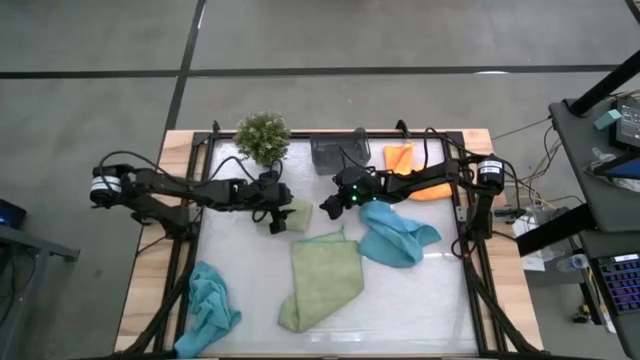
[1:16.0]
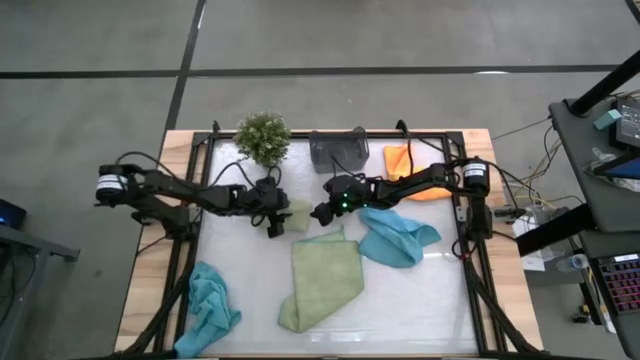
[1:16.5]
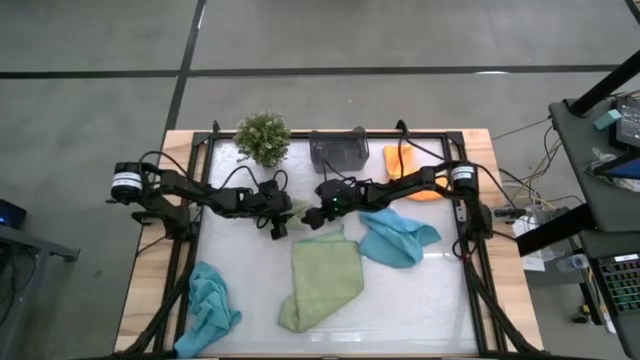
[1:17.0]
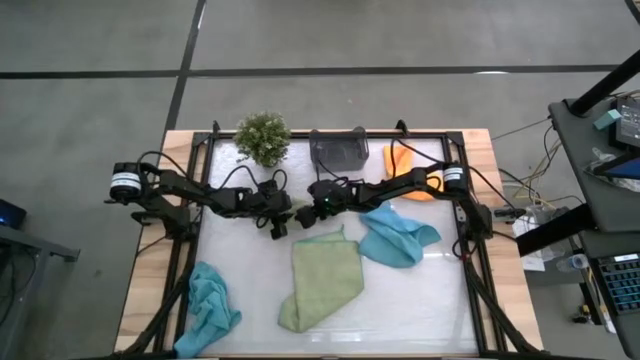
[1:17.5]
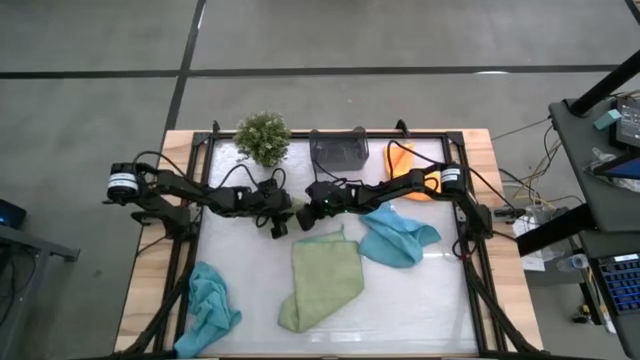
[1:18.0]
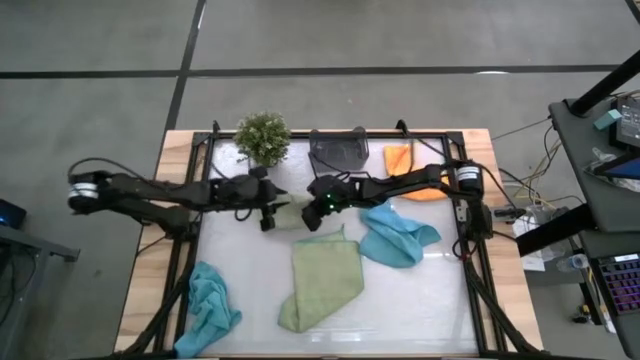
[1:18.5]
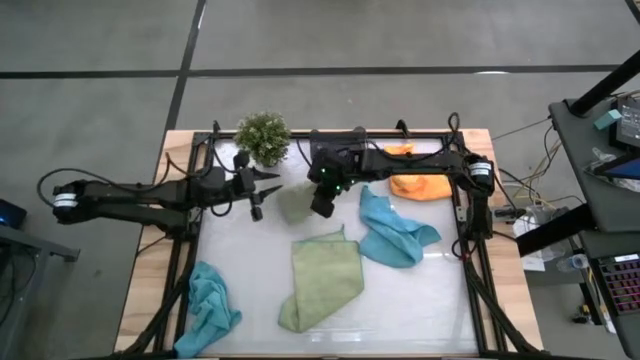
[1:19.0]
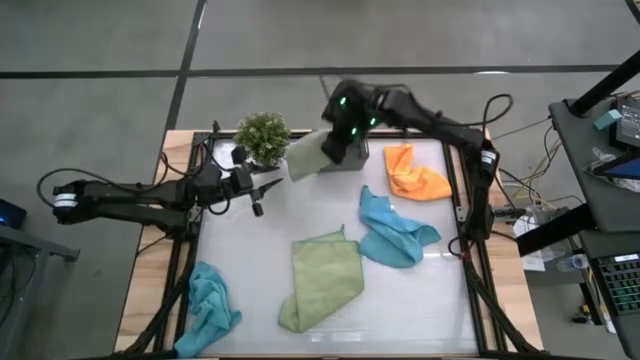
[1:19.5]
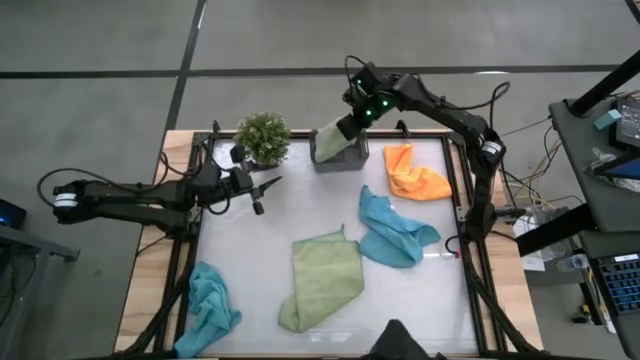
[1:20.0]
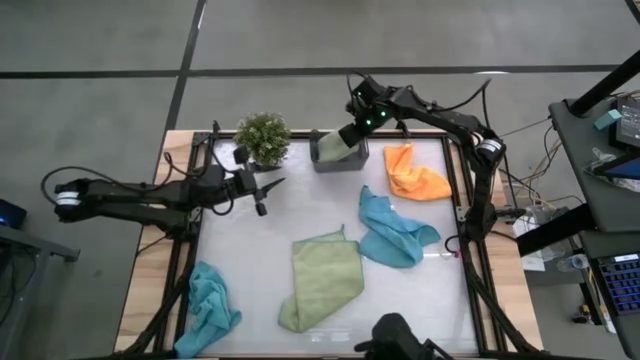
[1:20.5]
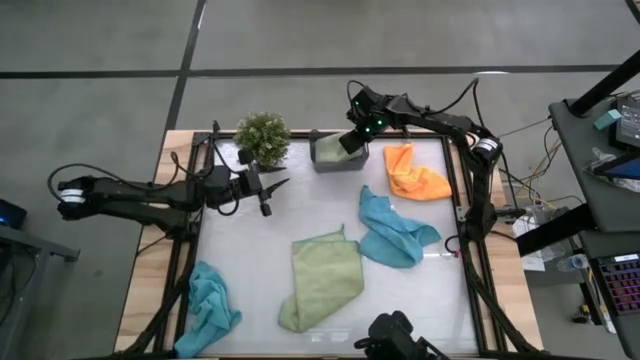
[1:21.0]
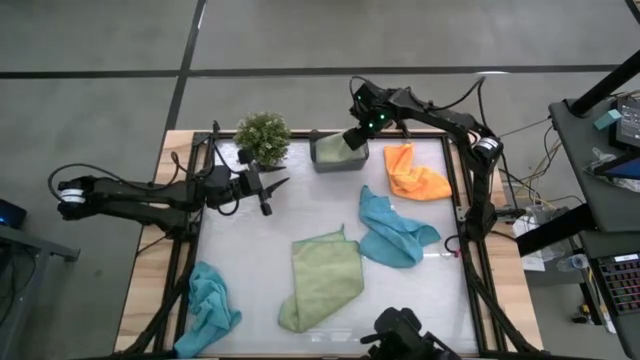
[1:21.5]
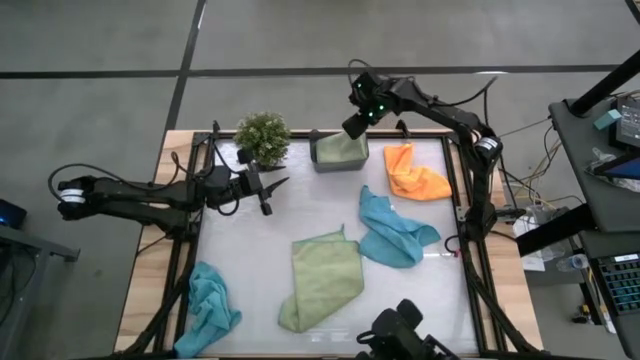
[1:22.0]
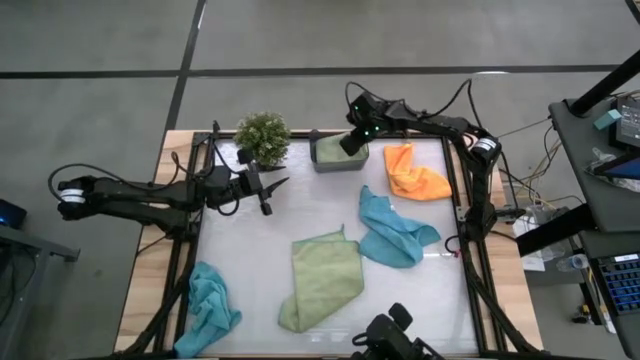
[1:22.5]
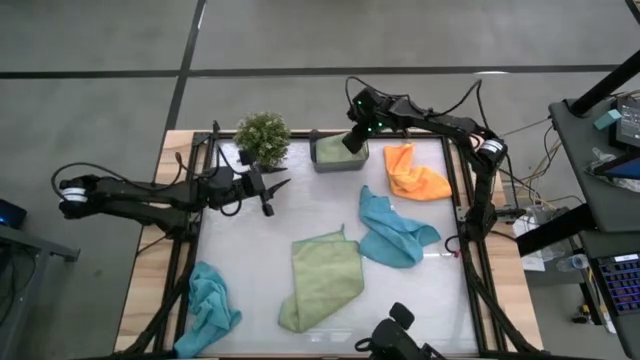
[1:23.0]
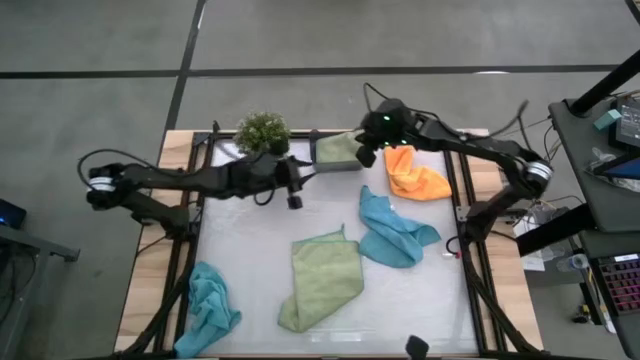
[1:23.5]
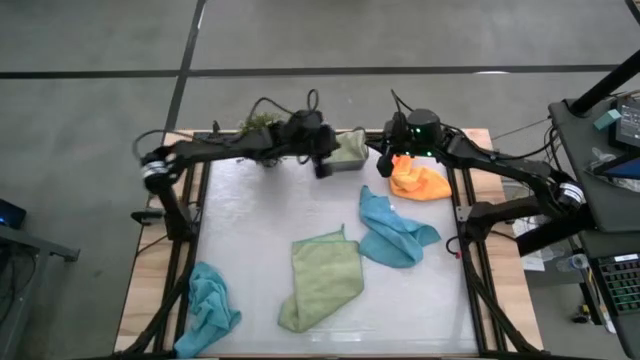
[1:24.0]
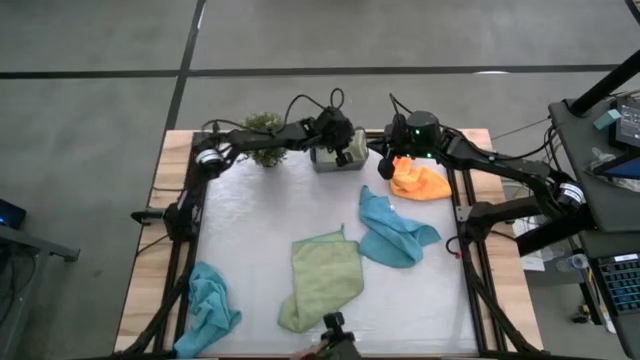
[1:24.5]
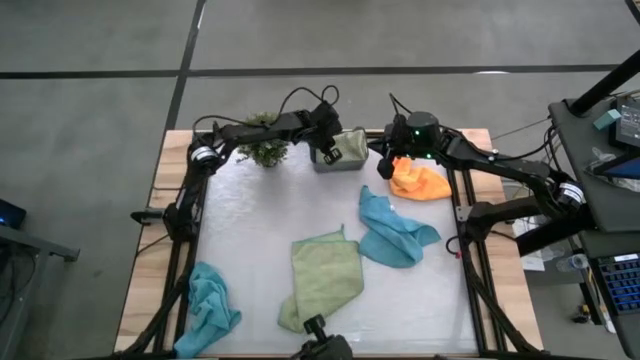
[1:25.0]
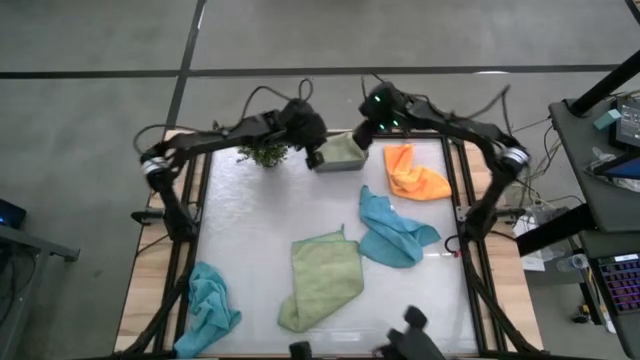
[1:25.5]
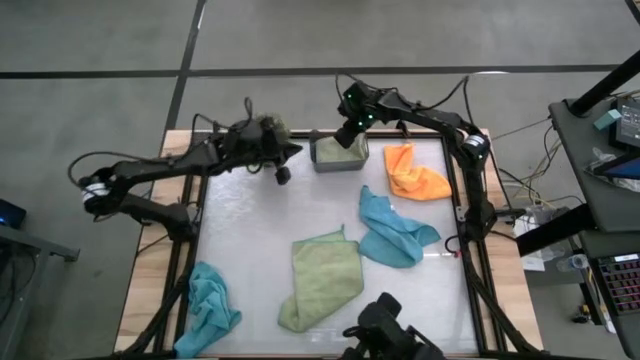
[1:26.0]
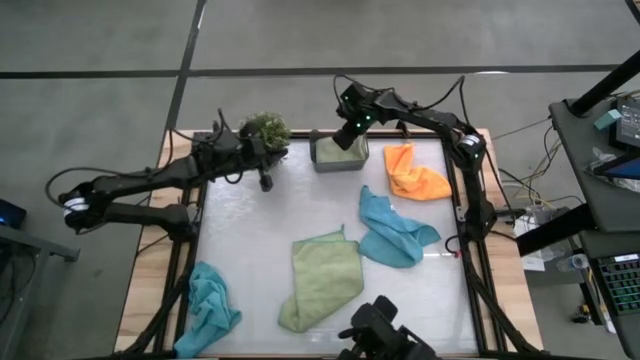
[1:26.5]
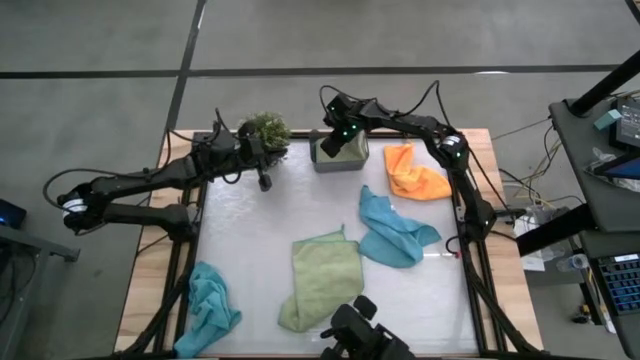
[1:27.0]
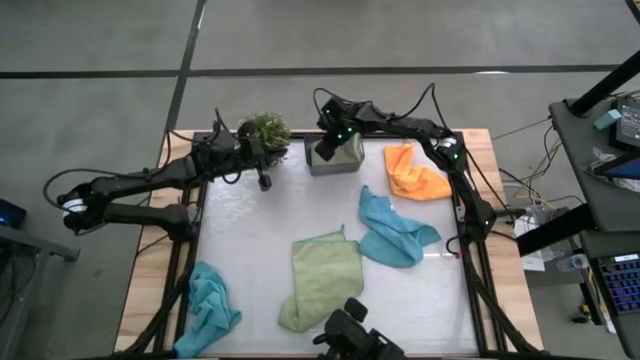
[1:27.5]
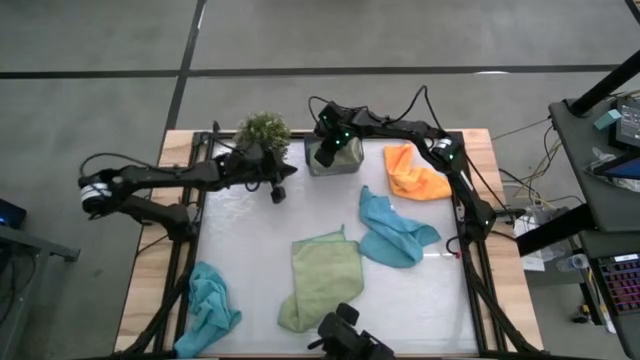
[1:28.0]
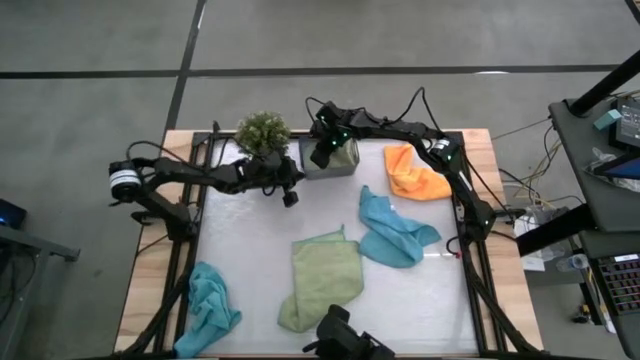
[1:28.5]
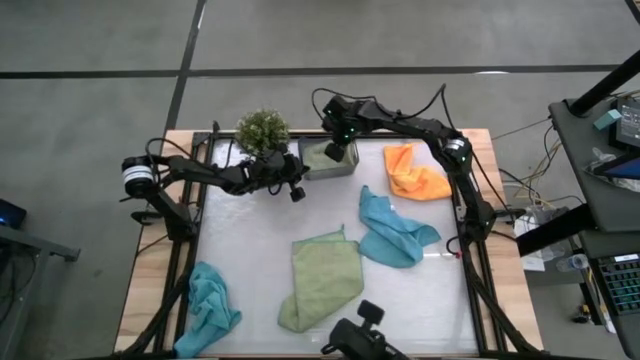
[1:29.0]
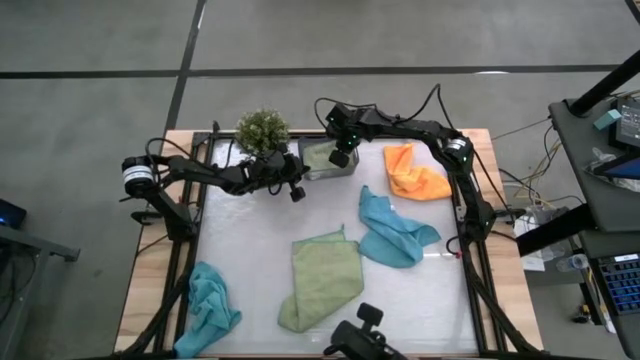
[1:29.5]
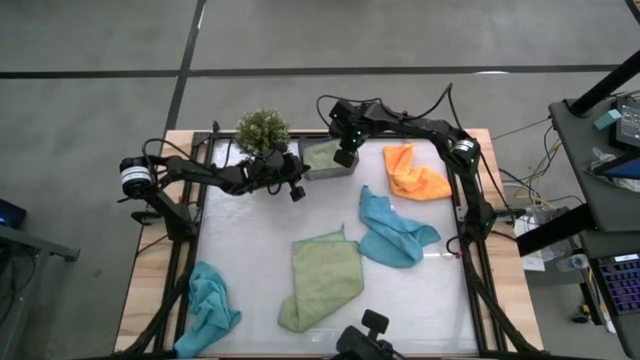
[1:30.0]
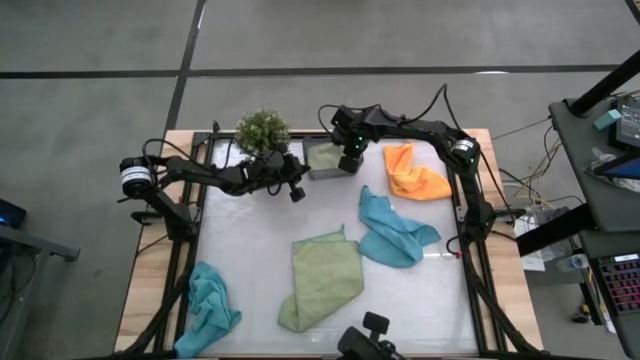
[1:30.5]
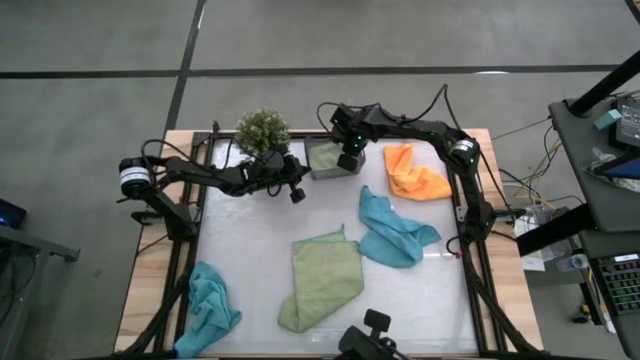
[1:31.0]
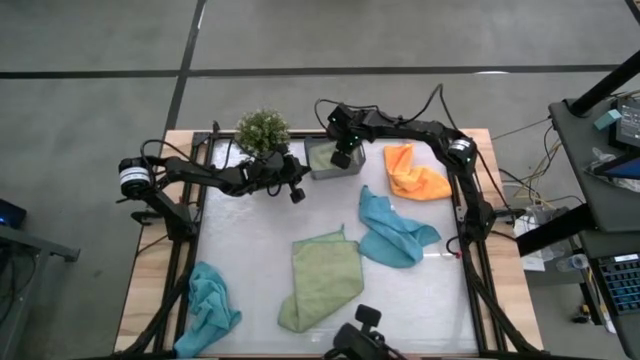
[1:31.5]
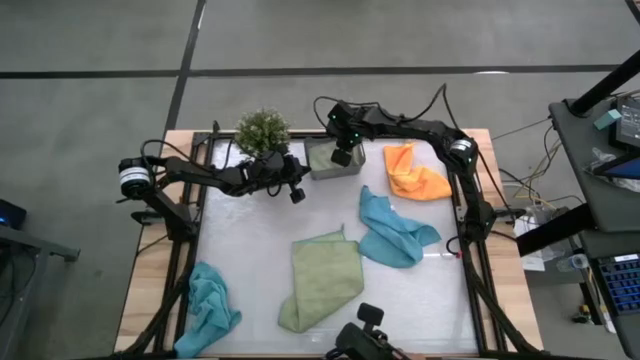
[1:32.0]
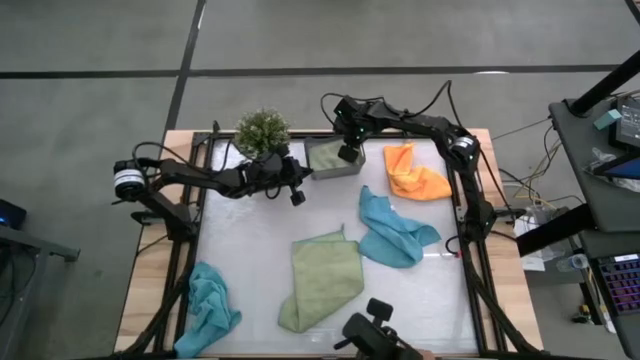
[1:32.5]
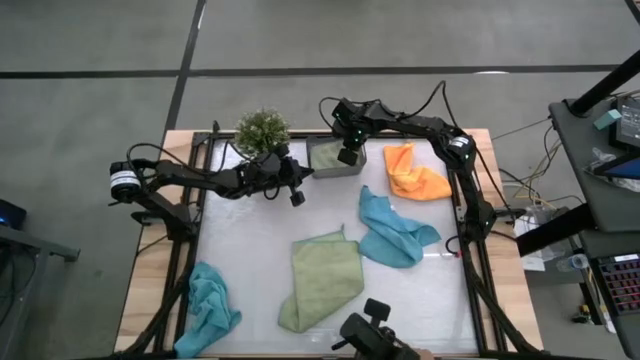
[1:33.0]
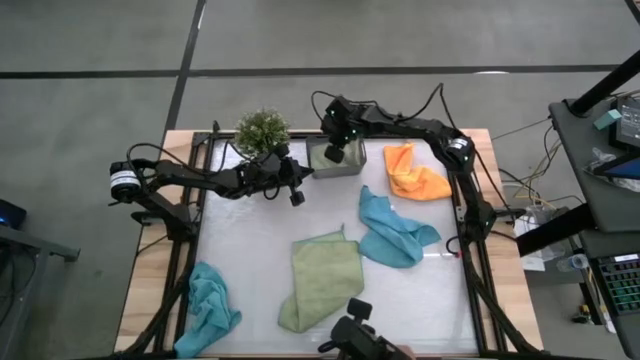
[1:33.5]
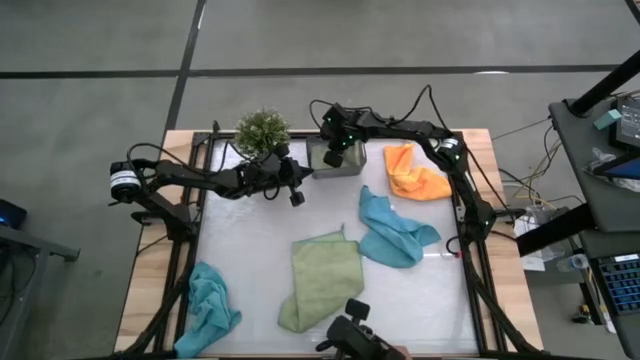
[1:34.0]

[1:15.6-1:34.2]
Task: Fold microfiber towels
Put the folded green towel into the black bin

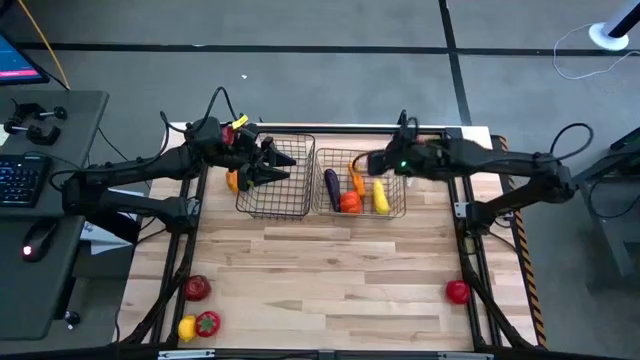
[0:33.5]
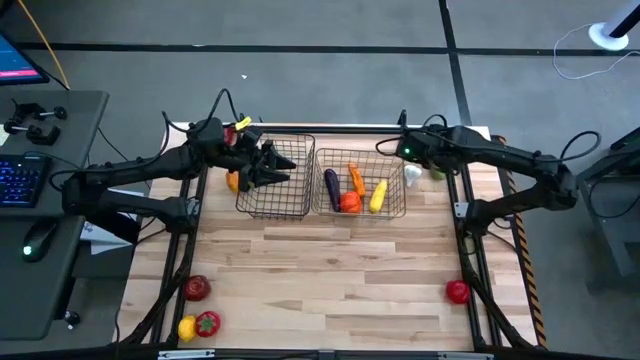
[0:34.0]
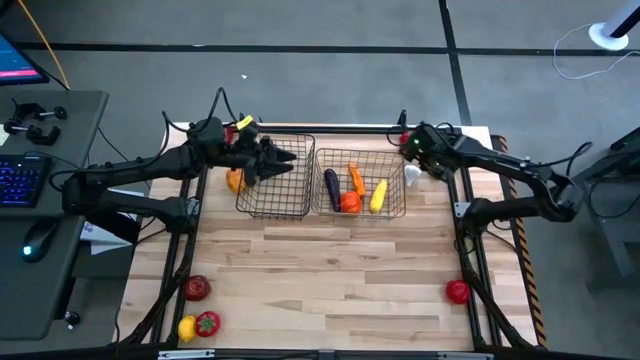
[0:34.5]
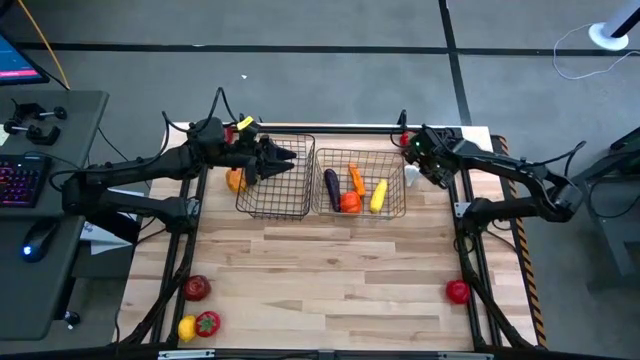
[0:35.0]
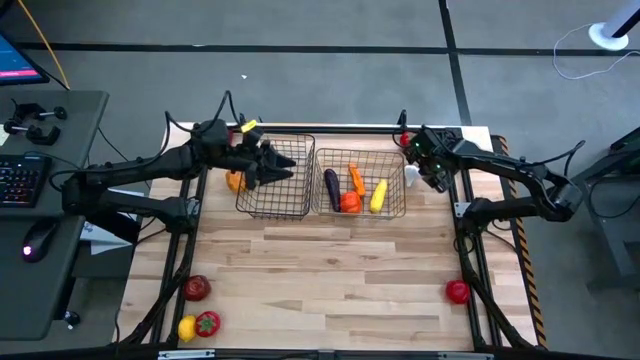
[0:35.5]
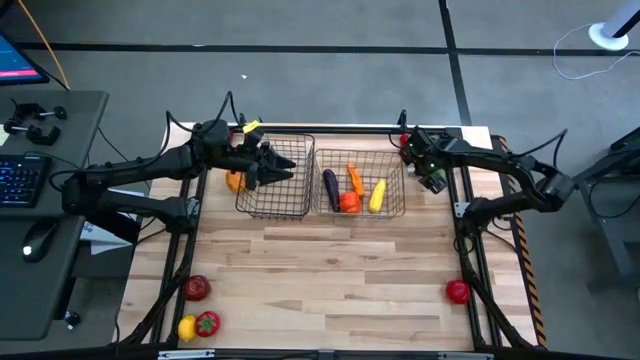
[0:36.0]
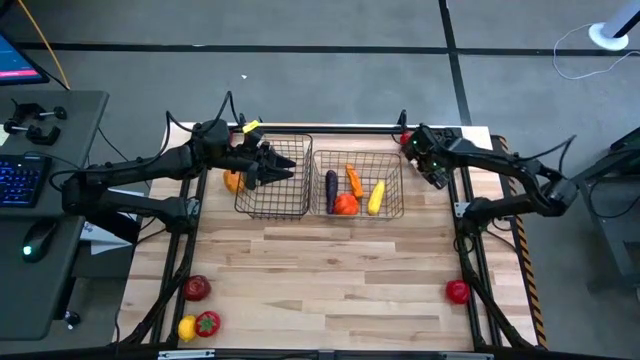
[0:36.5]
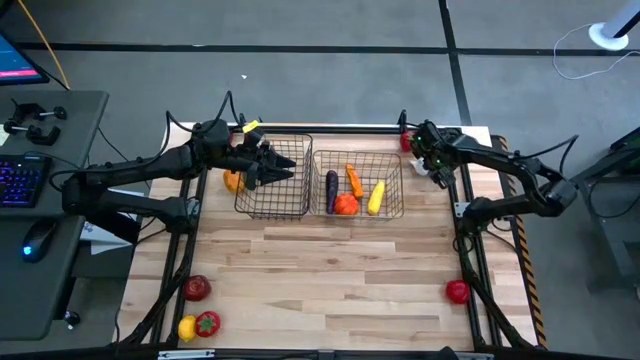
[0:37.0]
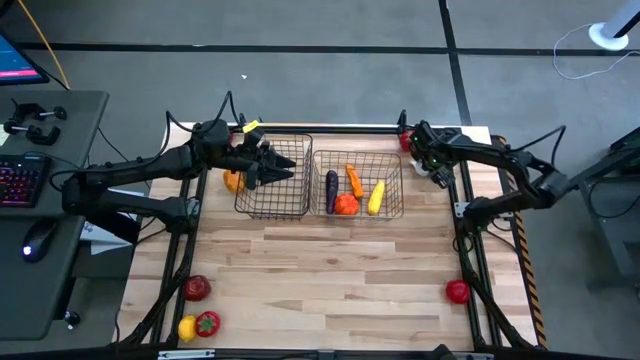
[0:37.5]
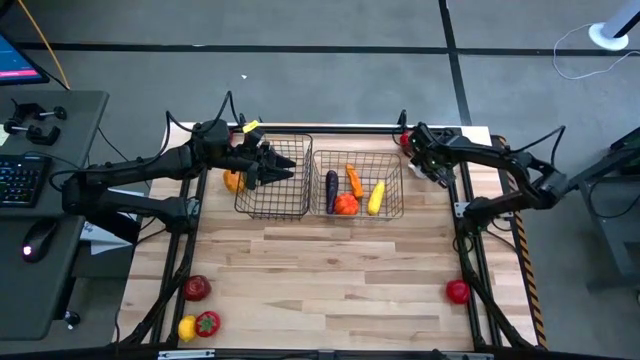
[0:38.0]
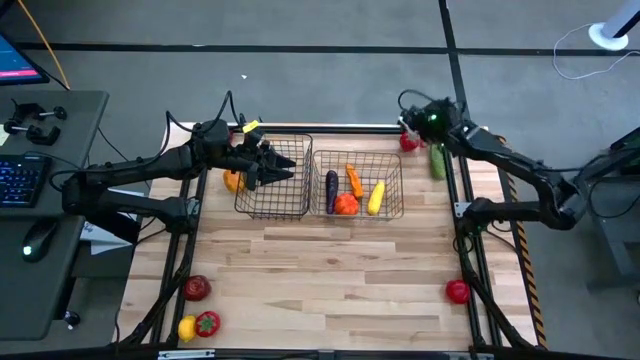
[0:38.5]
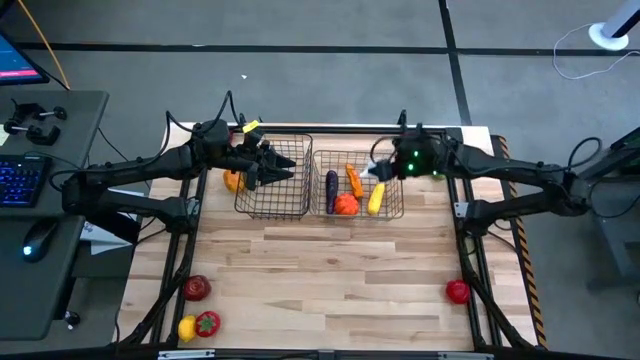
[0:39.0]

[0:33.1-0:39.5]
Task: Sort produce into baskets
Put the white garlic into the right wire basket
